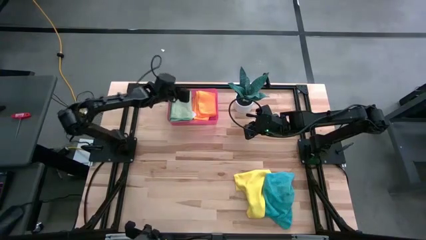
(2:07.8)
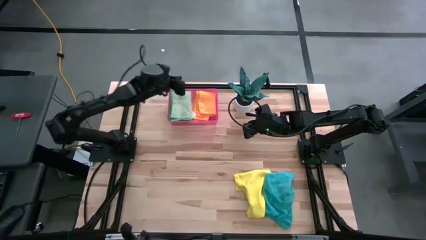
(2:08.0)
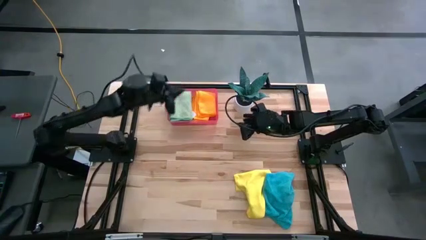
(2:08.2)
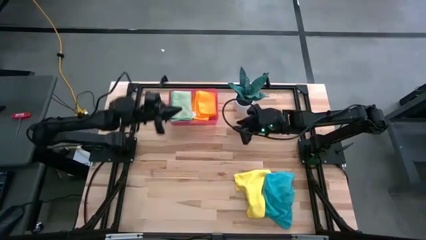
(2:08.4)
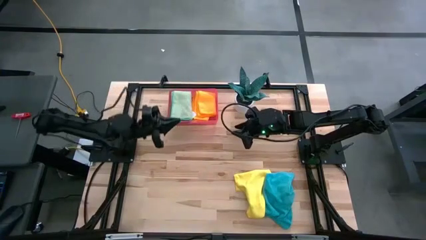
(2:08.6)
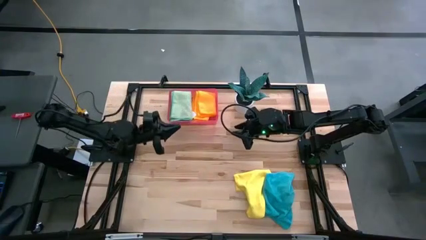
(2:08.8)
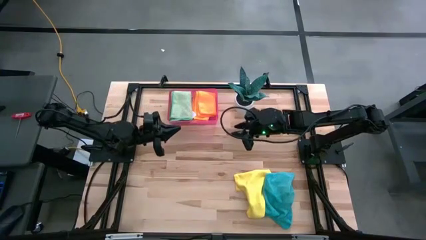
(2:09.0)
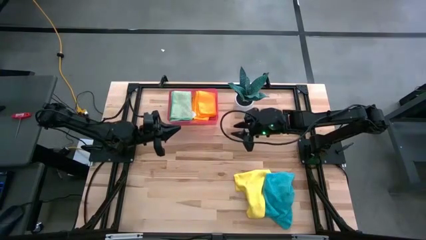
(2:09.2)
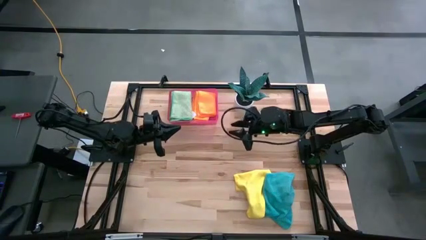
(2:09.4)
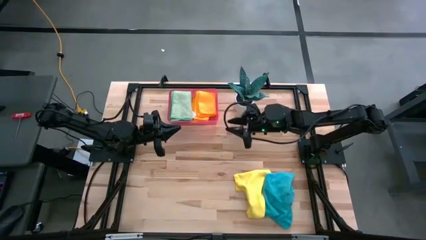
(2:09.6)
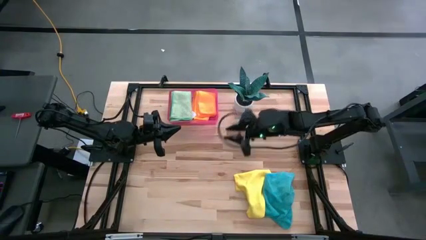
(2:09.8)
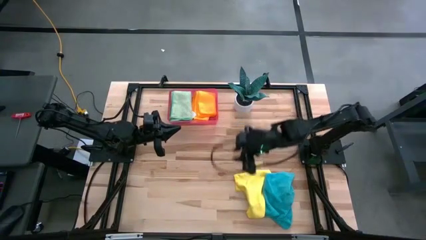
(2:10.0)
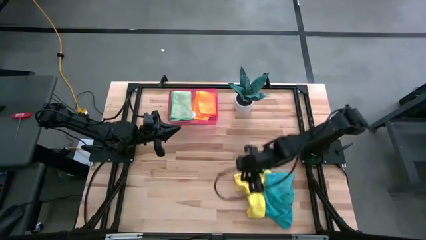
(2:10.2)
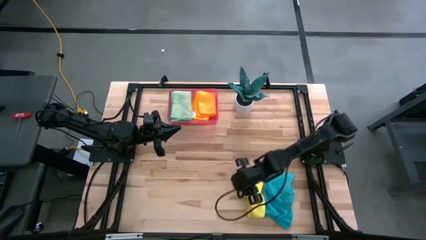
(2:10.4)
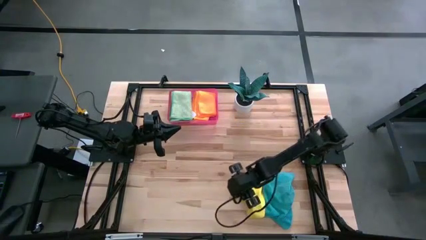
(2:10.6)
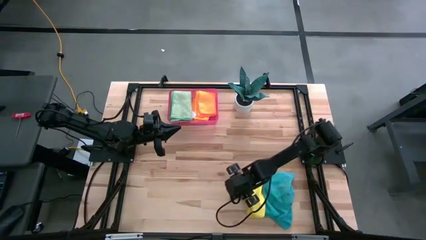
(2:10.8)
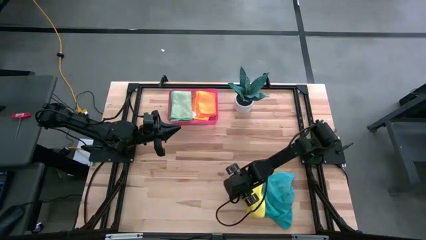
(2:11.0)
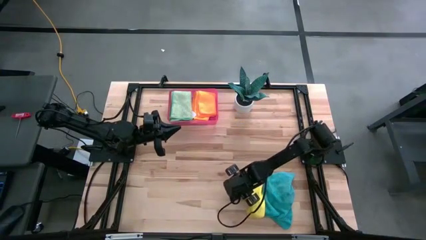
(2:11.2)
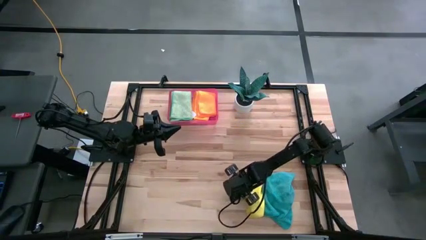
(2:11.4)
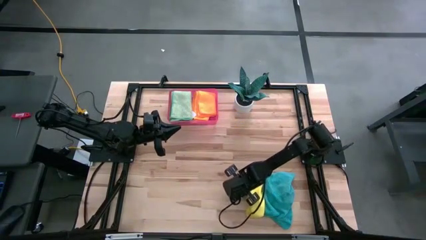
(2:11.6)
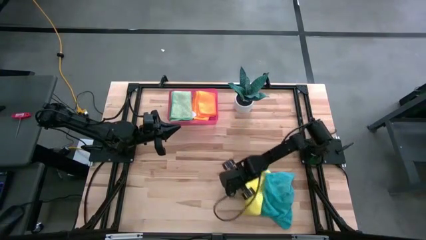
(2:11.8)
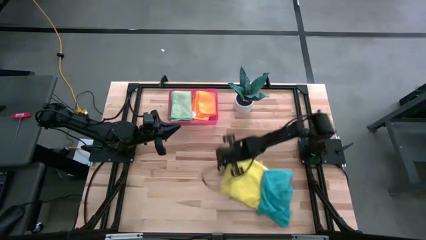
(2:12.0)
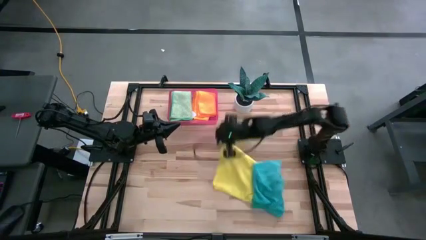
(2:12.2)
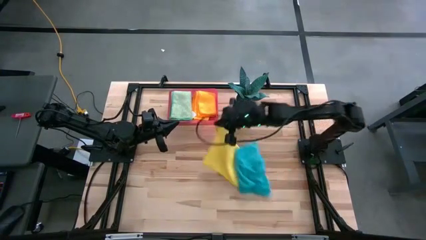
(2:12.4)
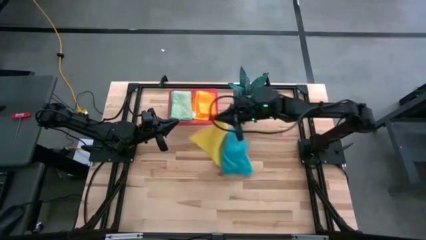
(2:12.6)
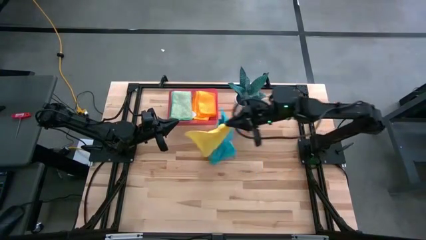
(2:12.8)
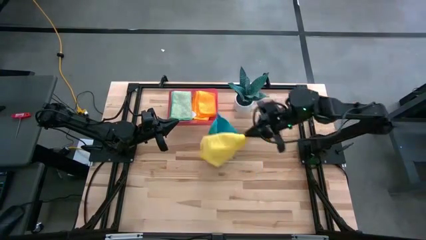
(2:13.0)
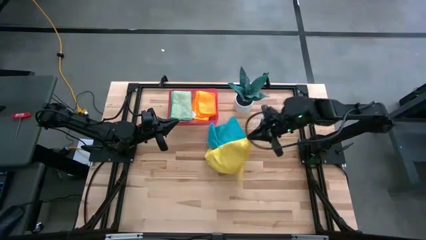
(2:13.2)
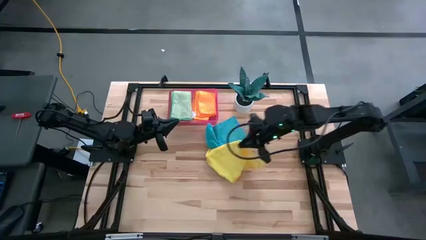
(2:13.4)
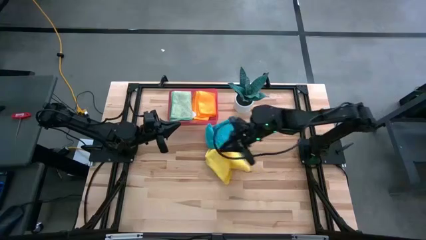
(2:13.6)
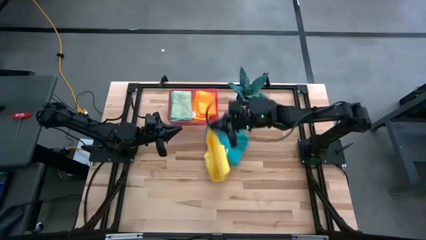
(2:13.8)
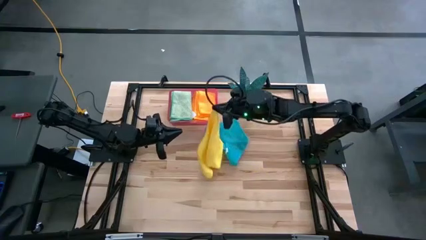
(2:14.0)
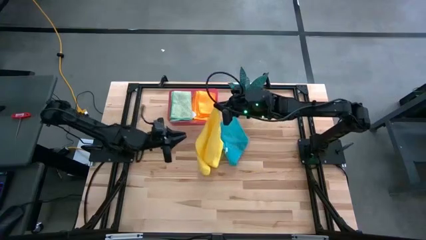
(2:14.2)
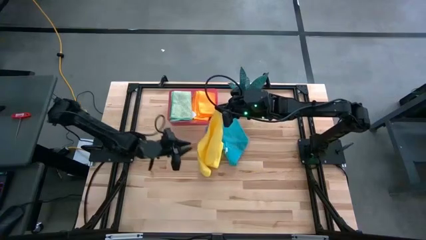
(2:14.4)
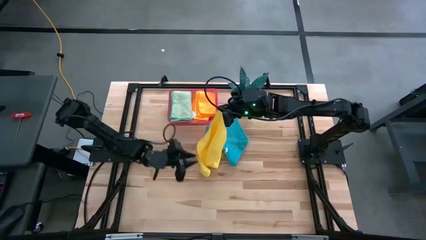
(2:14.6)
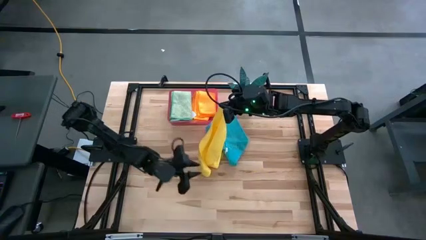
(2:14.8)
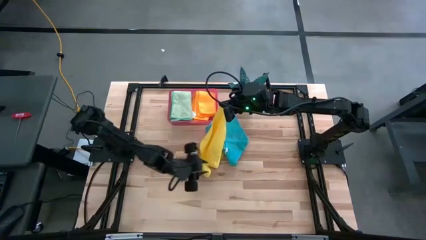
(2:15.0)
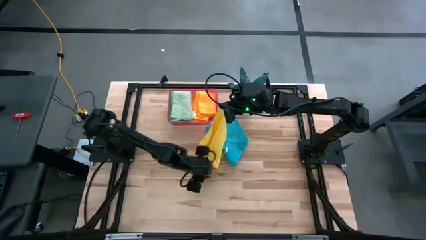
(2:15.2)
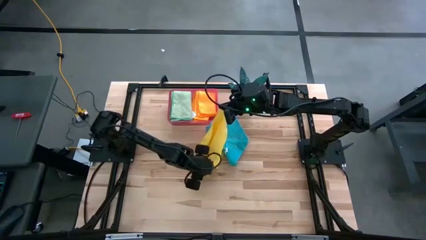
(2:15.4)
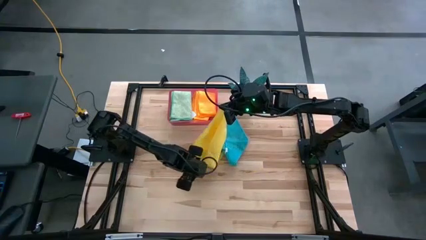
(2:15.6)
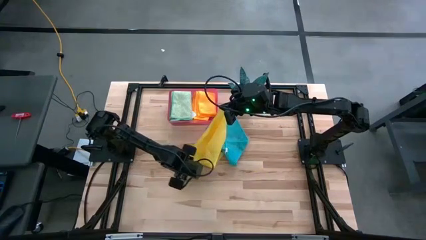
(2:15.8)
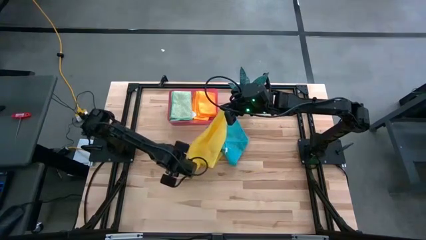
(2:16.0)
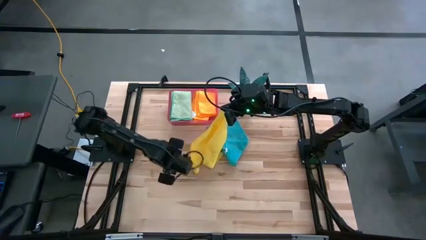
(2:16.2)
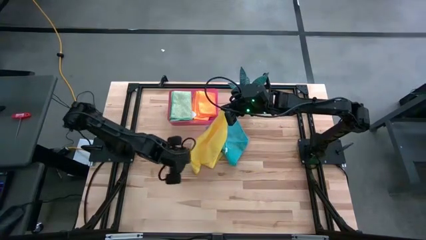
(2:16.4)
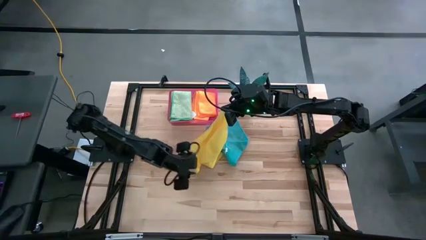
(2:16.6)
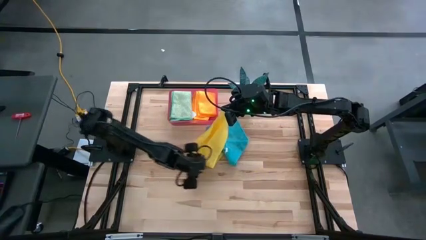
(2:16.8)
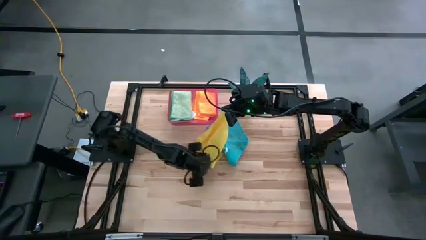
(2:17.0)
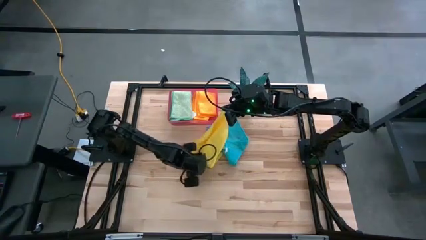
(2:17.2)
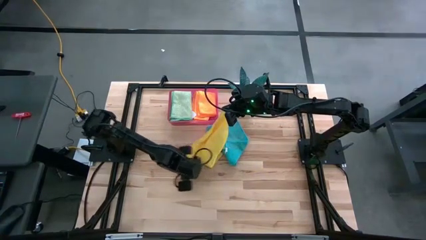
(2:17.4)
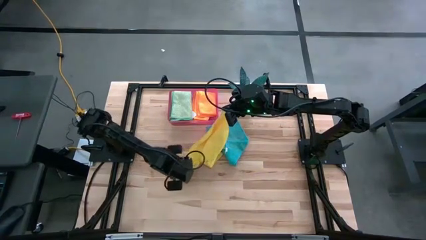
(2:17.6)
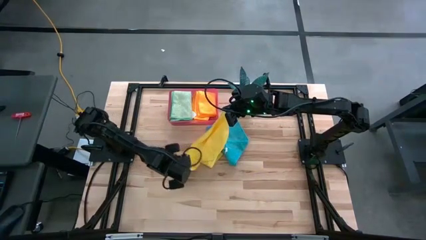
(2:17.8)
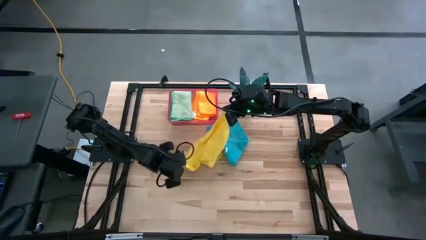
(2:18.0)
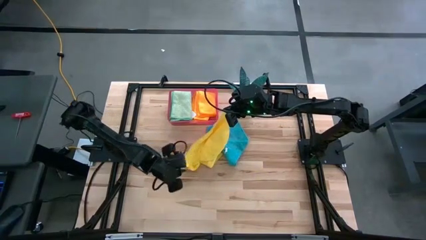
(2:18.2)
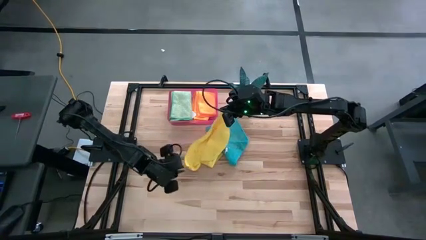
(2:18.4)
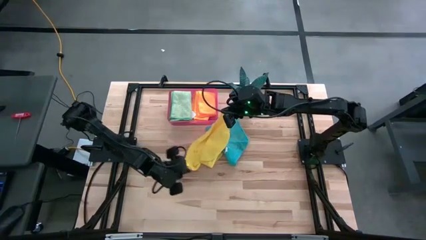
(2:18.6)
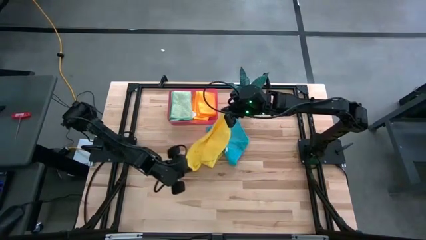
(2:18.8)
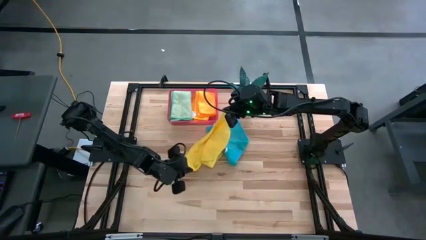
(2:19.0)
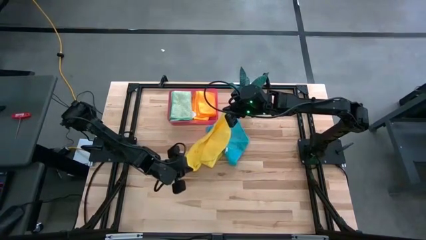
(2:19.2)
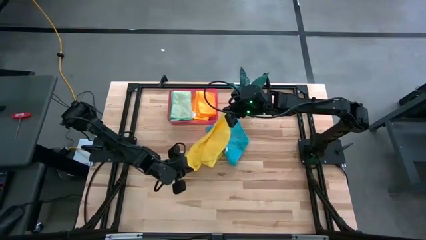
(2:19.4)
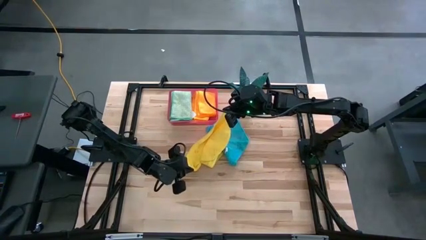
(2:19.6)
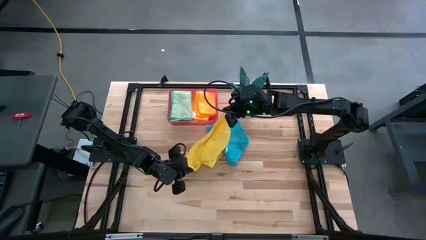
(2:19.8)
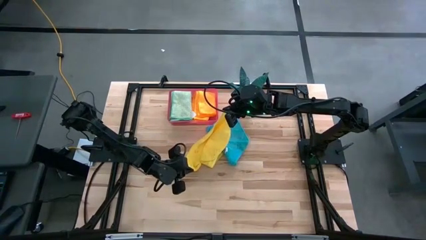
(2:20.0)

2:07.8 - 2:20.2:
Task: Fold microfiber towels
Fold the yellow microfiber towel

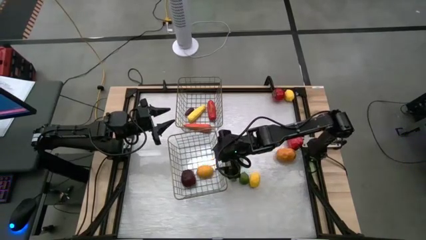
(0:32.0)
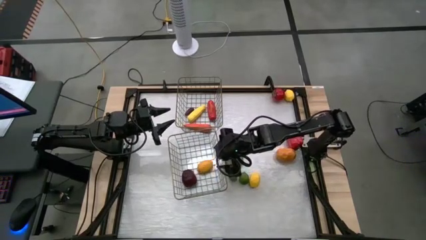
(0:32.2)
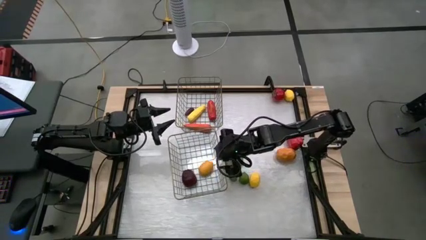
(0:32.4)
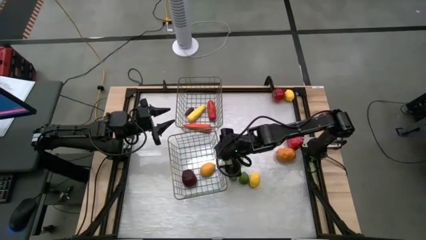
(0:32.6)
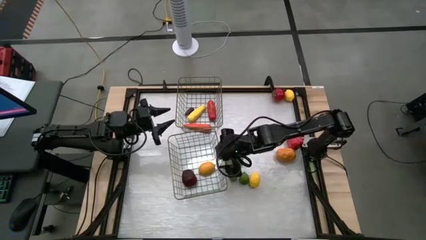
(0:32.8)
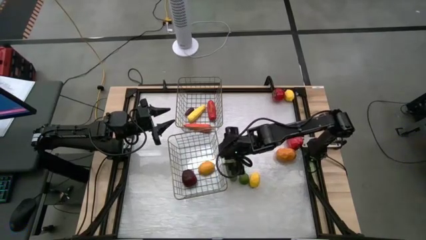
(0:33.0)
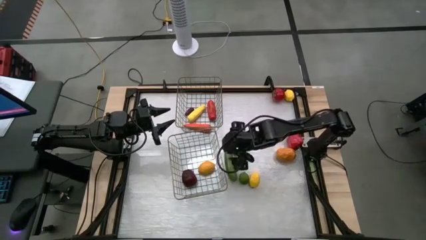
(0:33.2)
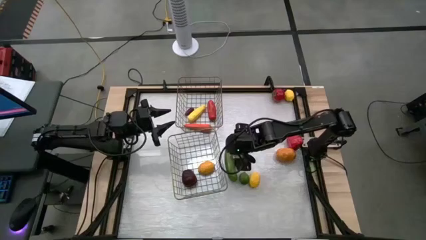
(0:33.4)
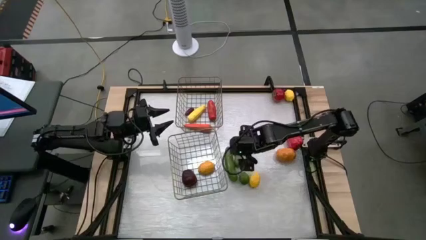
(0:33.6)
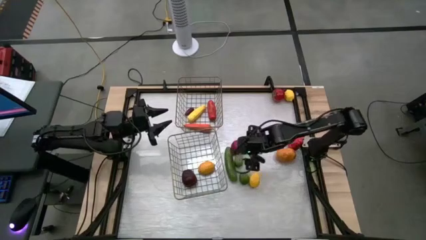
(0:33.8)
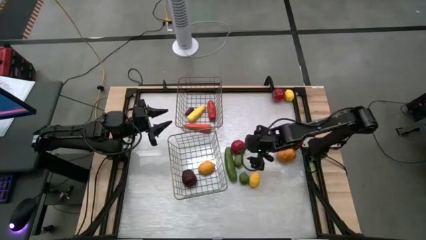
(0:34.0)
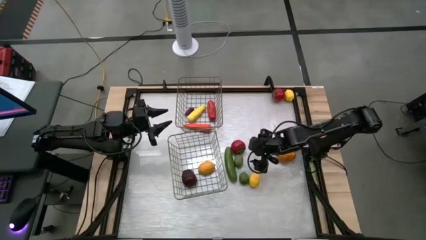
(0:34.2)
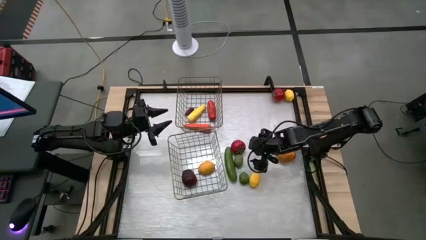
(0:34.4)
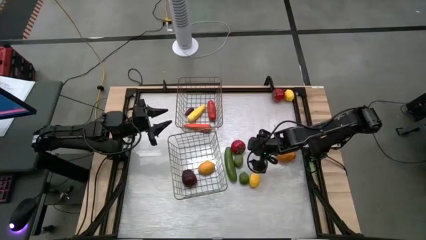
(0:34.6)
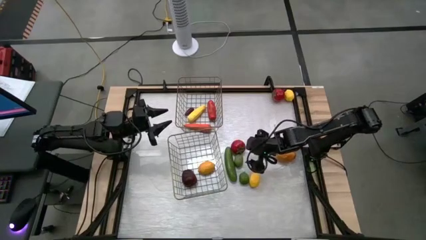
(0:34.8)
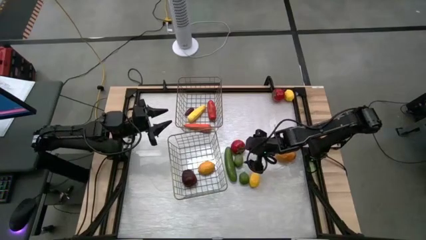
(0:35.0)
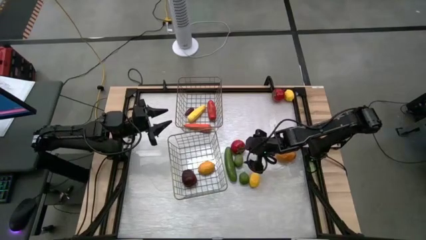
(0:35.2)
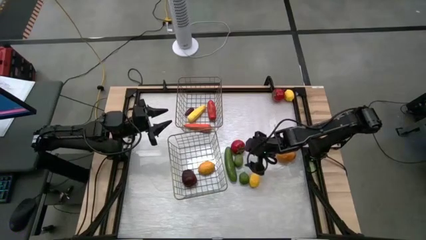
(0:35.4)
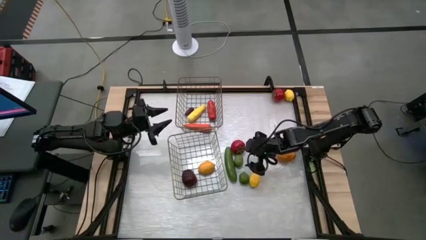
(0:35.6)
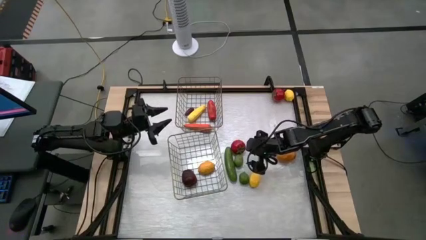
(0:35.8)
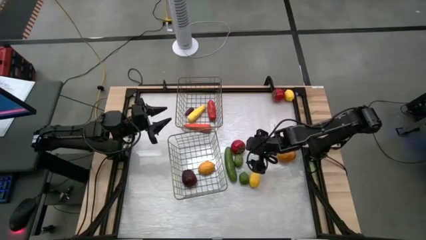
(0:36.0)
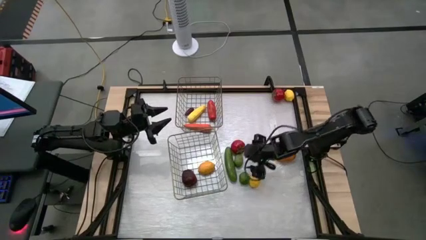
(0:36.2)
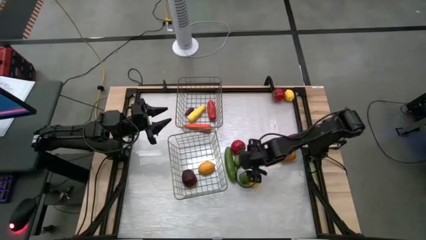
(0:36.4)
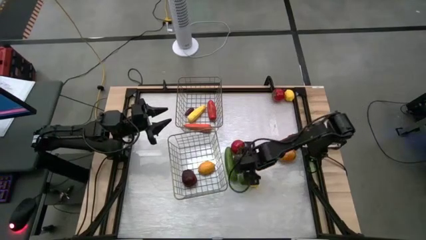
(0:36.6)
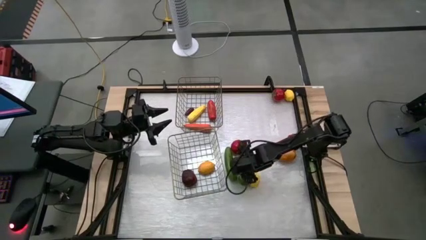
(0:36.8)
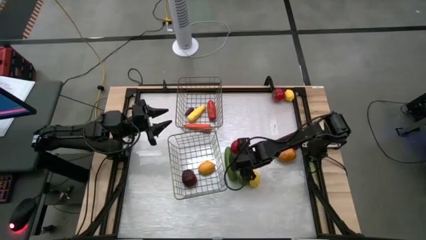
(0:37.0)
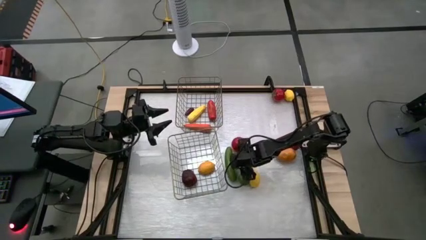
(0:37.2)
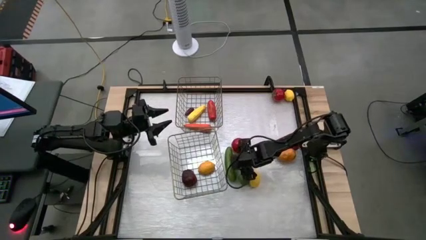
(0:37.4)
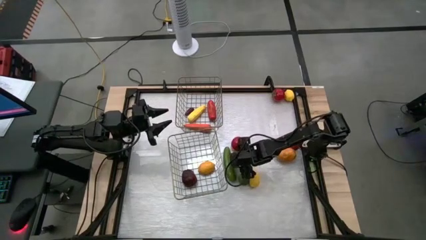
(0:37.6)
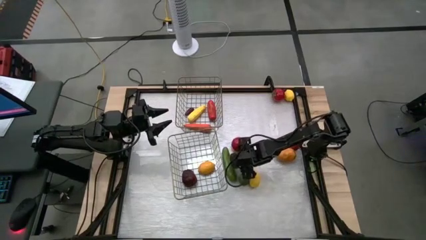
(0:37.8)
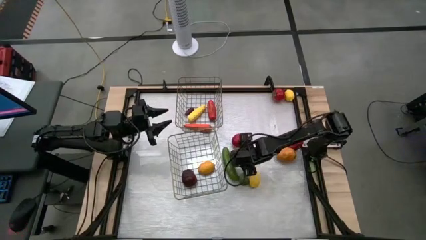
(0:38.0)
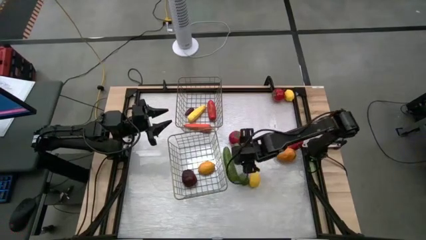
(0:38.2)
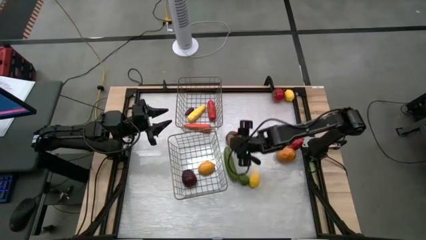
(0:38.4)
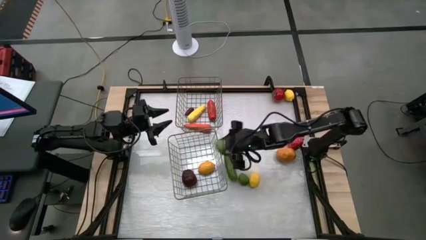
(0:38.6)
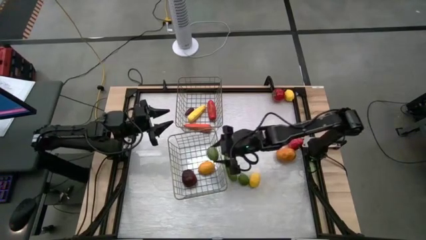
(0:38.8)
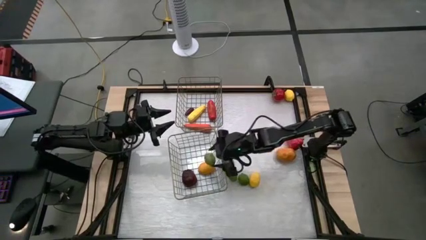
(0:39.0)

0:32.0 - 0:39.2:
Task: Sort produce into baskets
Put the top green lime into the bottom basket
